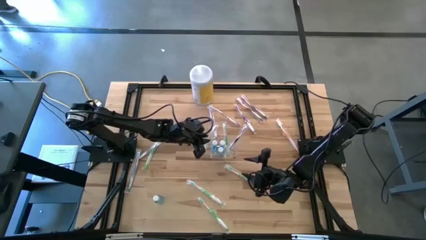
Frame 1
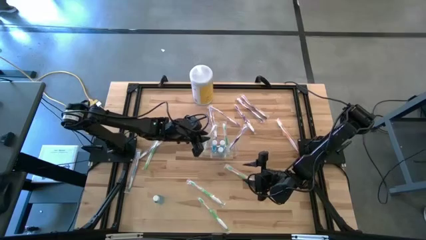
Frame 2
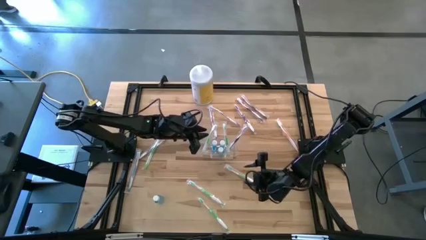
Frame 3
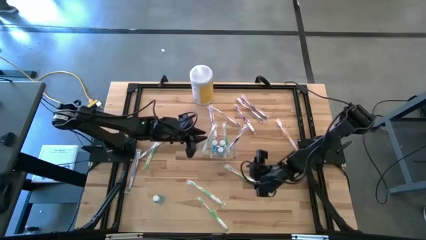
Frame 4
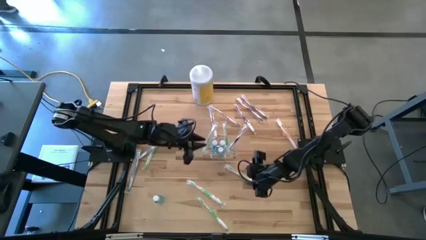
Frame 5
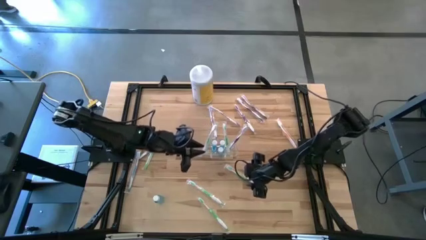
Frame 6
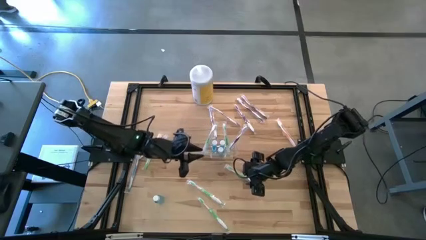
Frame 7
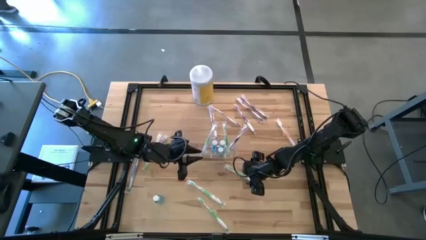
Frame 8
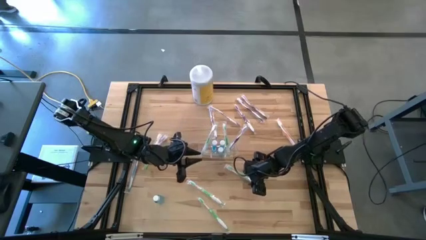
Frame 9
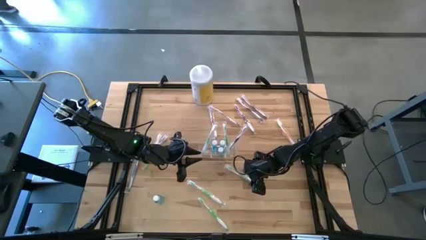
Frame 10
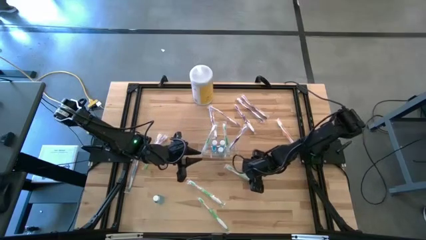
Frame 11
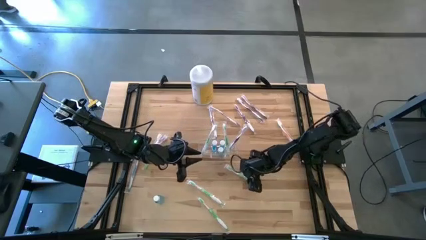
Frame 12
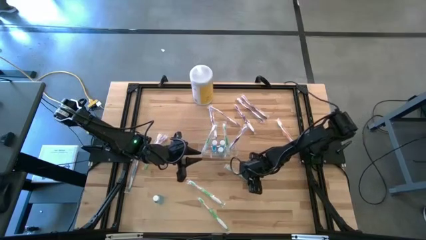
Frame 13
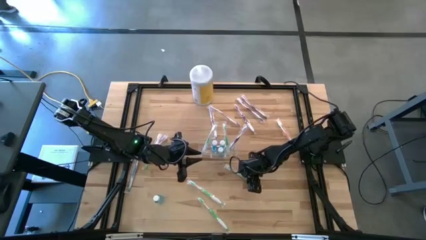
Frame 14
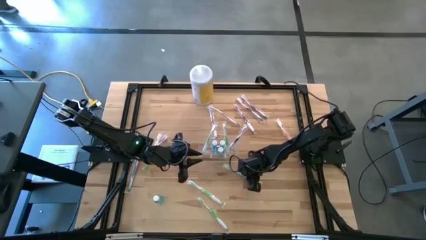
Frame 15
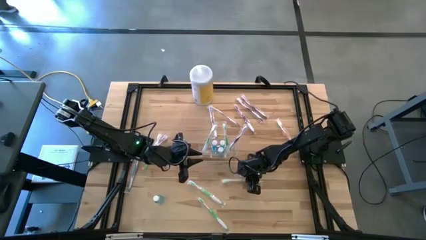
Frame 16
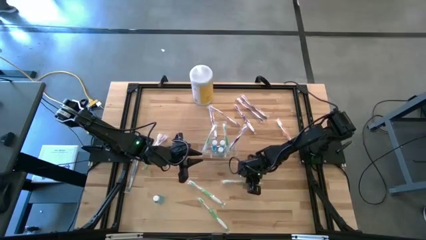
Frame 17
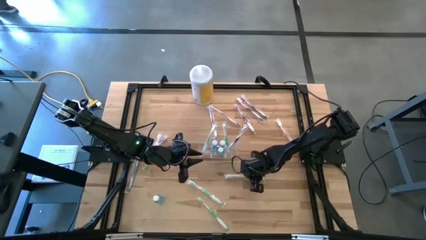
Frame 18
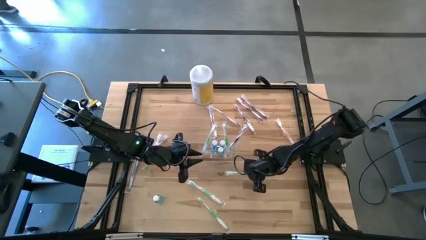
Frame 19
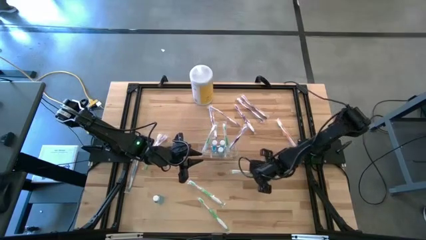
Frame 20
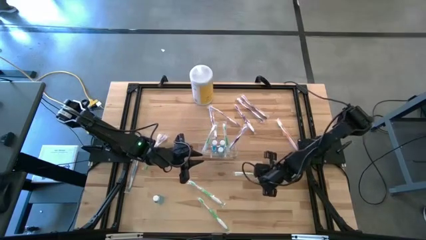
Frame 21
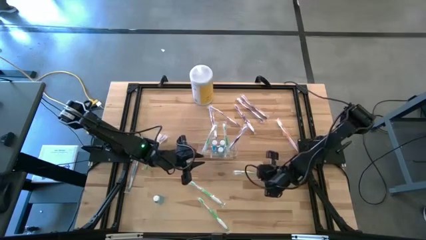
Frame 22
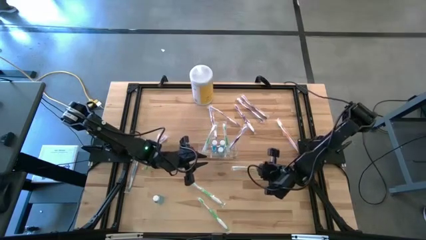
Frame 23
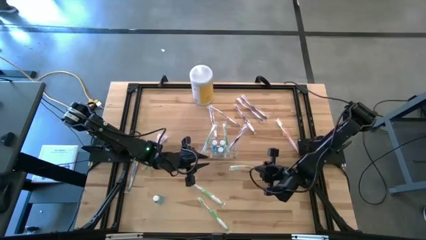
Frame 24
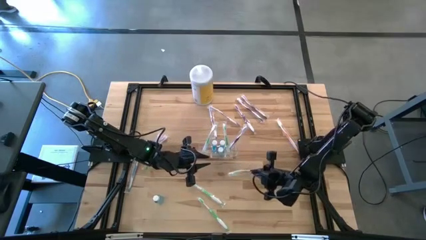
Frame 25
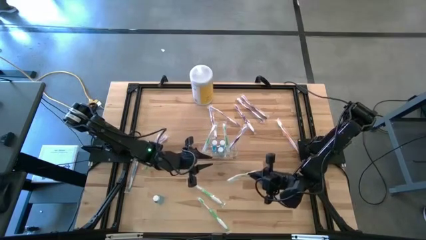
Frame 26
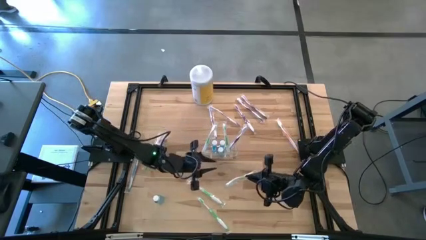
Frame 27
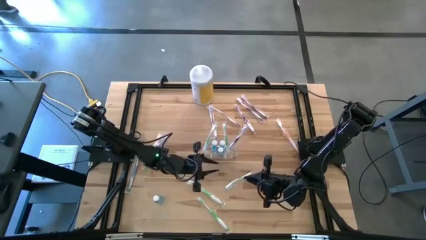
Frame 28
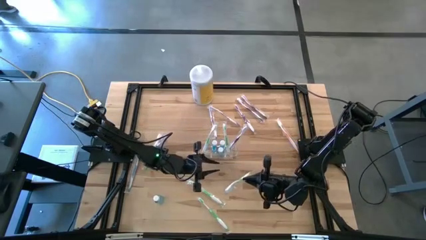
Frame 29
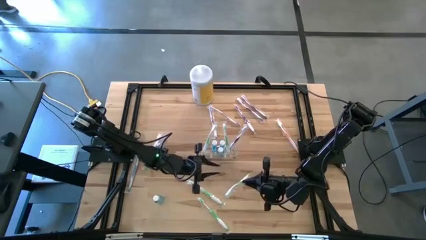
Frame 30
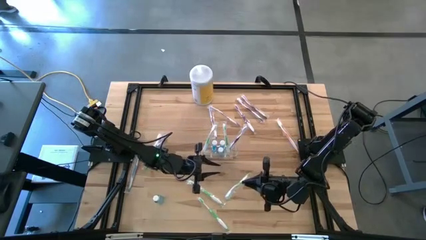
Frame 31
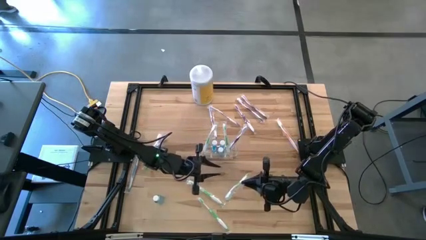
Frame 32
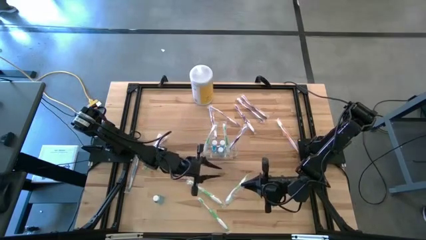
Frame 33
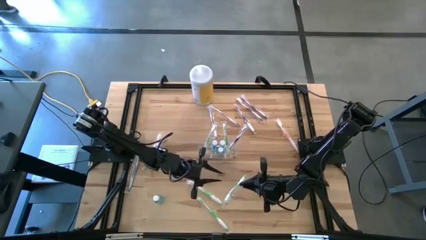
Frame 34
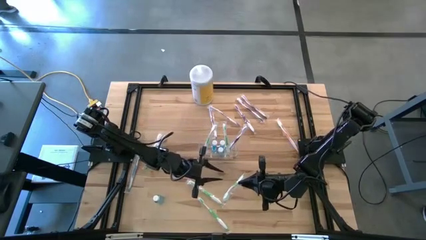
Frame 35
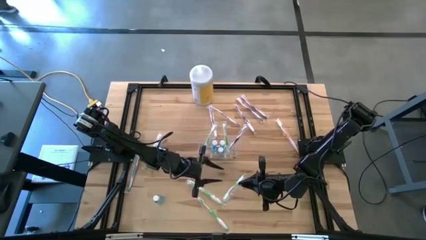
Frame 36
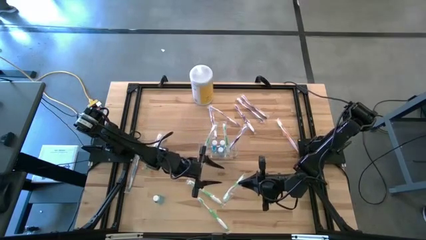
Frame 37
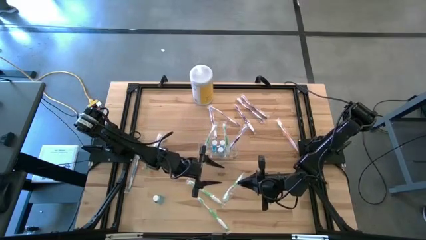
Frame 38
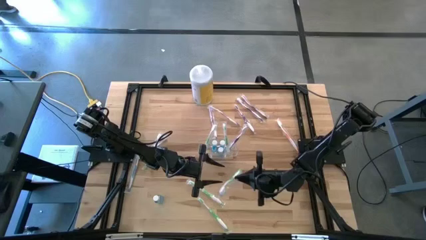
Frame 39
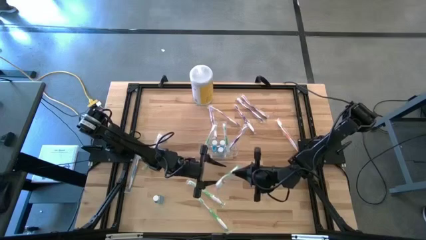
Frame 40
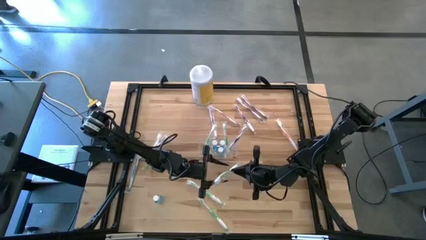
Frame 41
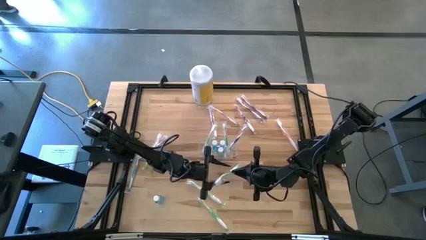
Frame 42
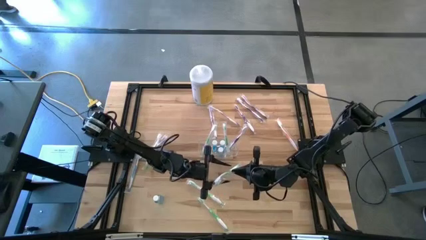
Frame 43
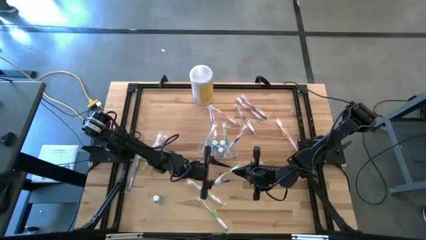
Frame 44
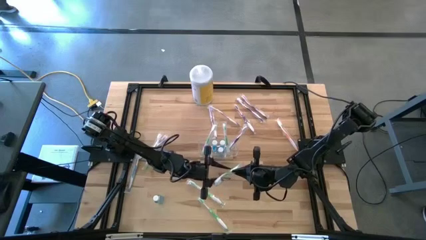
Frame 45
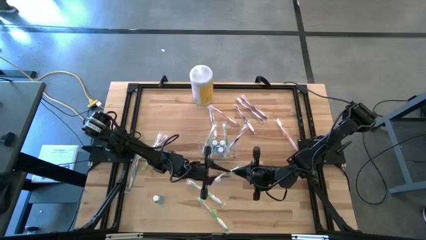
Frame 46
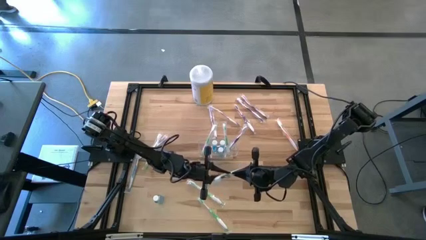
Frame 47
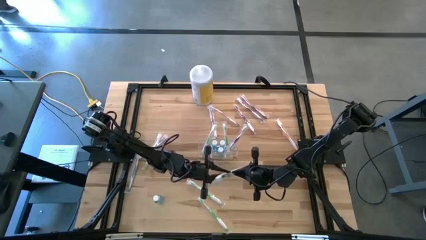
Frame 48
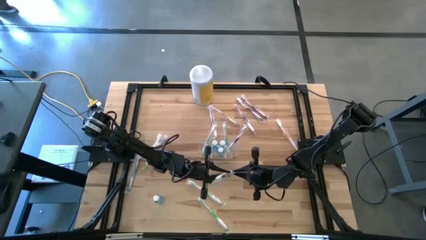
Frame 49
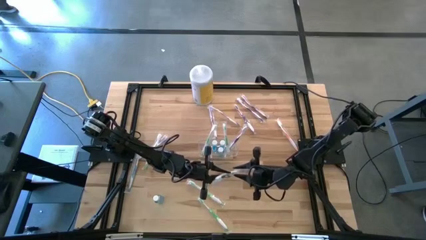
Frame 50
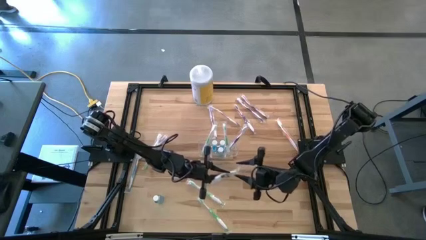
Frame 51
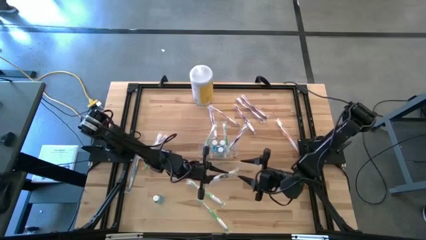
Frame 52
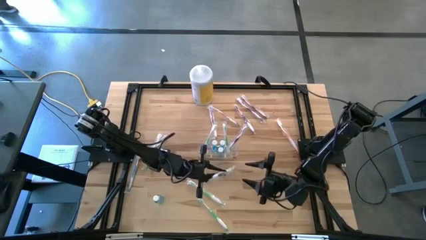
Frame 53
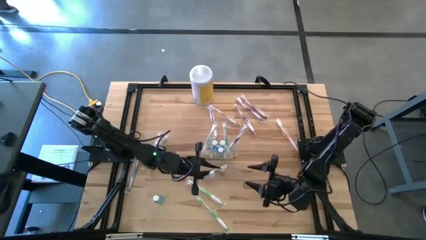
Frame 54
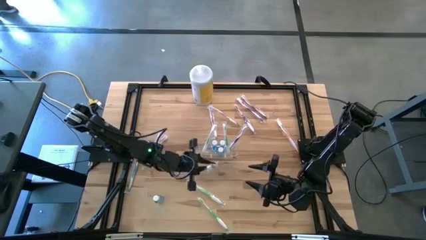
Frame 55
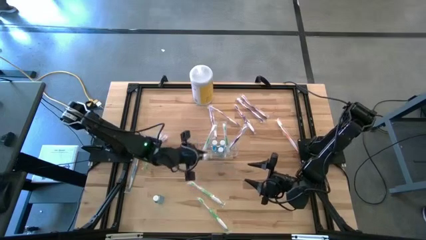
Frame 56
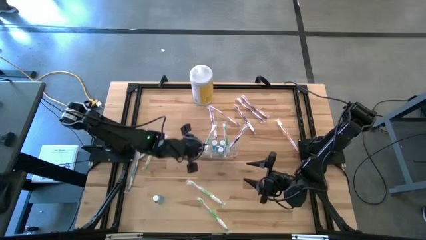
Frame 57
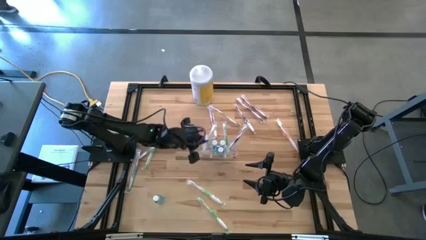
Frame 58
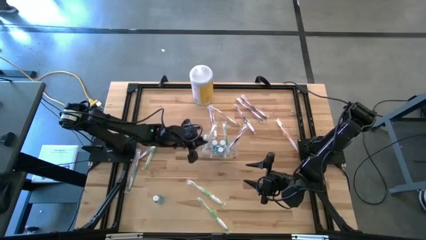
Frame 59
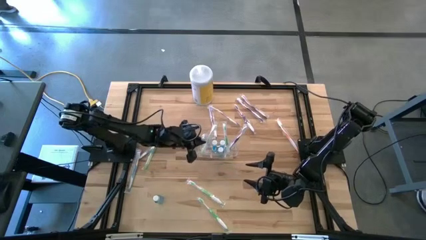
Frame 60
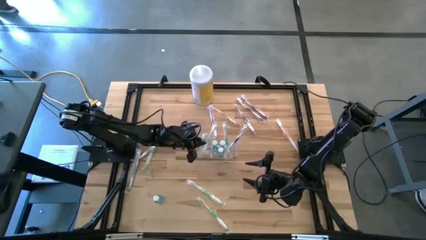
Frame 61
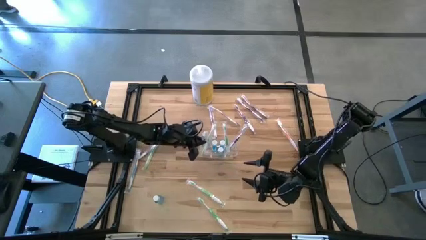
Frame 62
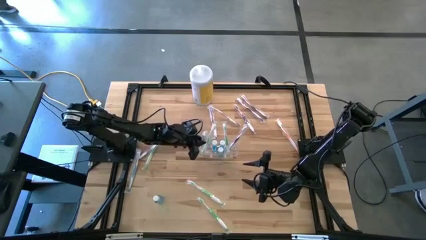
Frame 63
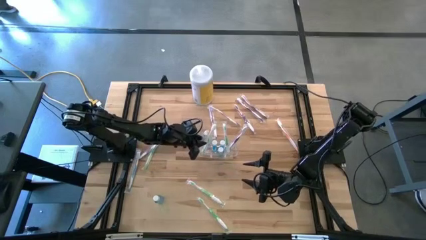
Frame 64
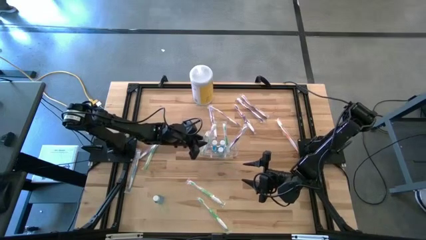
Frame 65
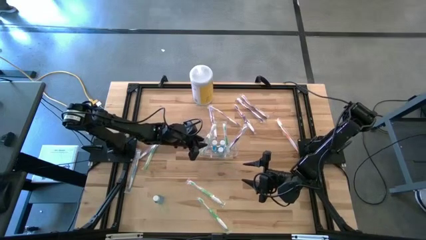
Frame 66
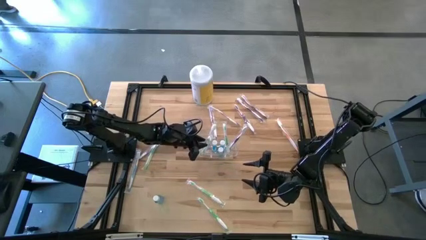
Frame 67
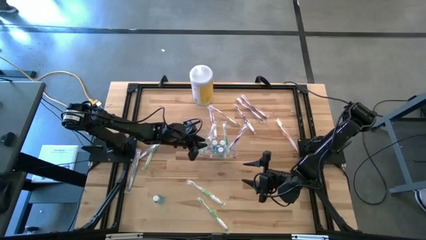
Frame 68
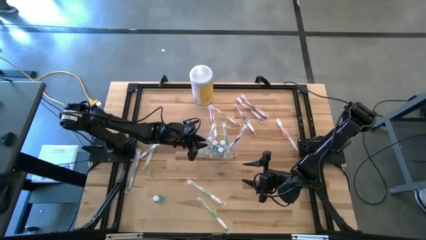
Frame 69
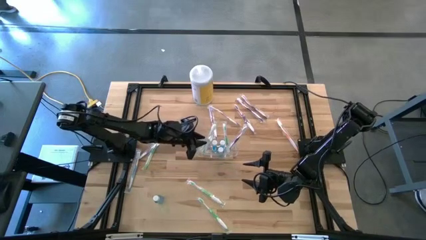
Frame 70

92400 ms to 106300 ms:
Task: Pick & Place toothbrushing station
Put the green toothbrush into the transparent organizer

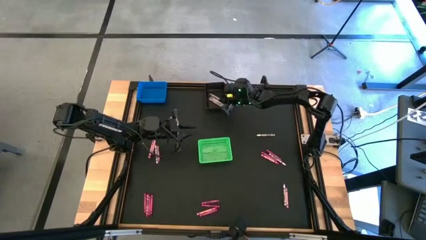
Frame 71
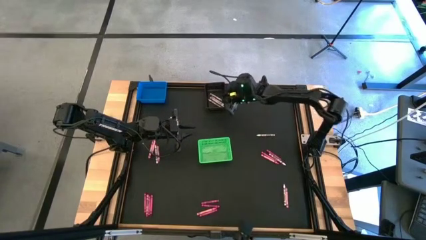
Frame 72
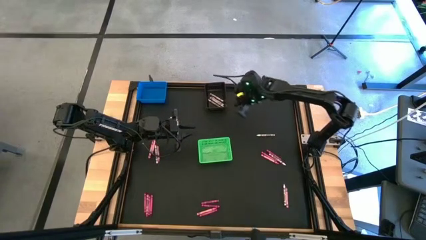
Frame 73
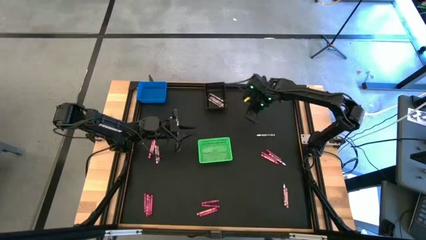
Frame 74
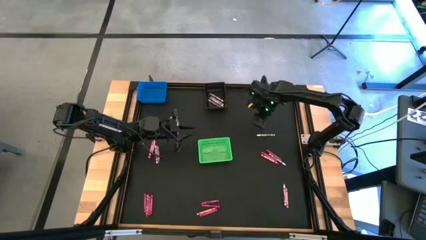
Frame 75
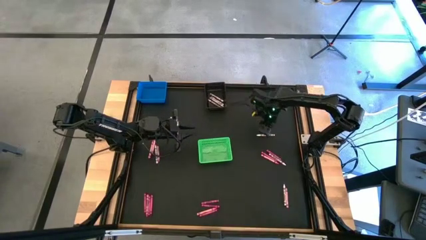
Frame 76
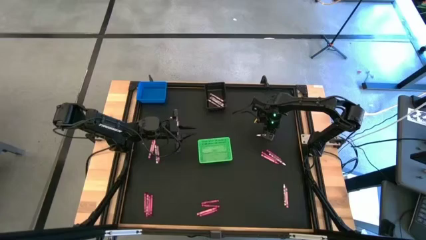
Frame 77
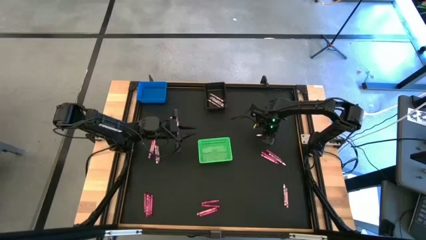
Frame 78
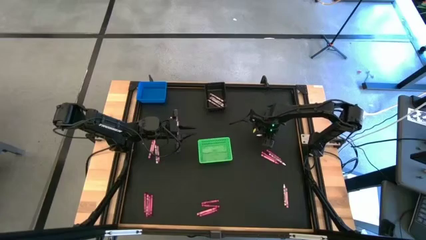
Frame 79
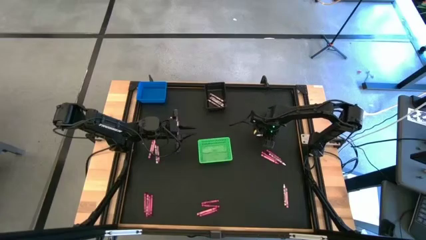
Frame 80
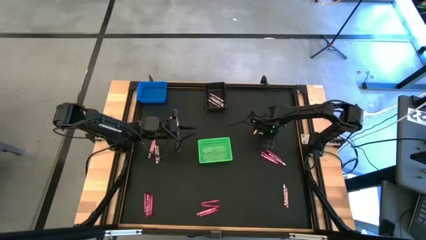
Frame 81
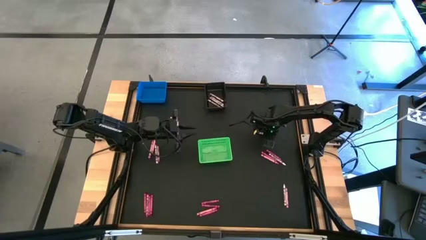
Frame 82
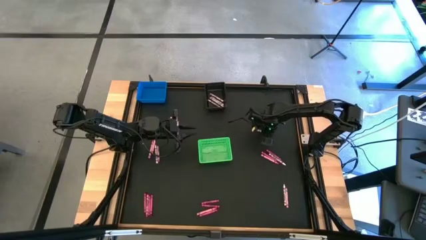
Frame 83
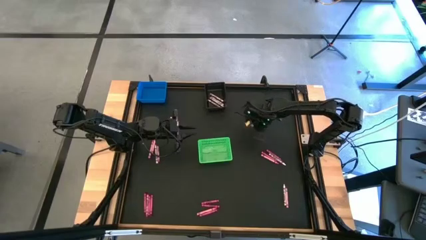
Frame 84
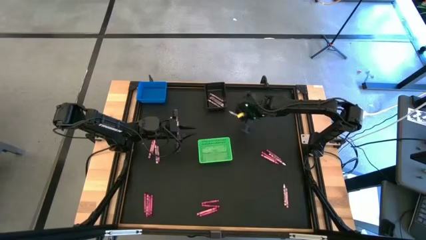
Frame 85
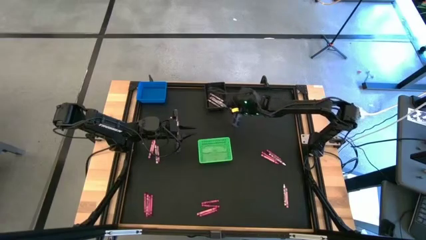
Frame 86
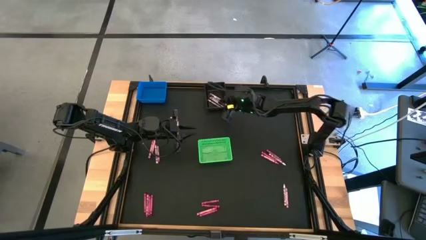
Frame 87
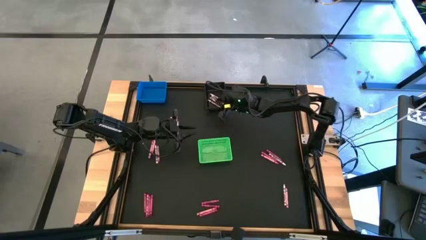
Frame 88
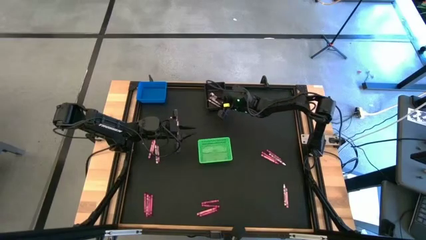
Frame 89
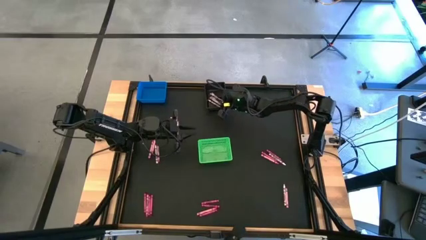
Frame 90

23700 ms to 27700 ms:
Task: Sort crayons
Put the white crayon into the black bin
